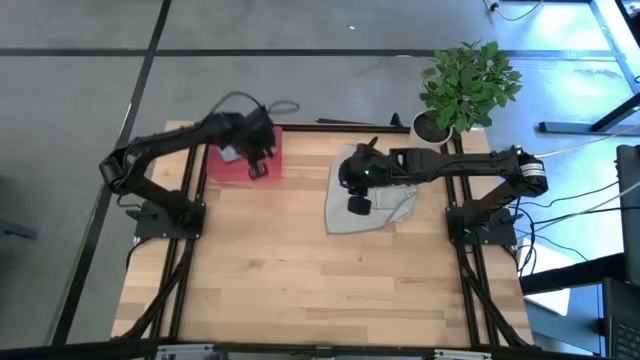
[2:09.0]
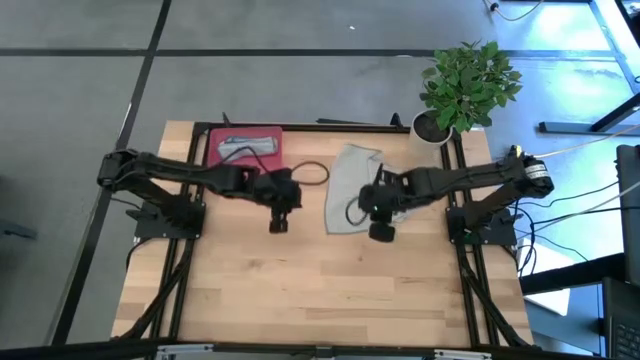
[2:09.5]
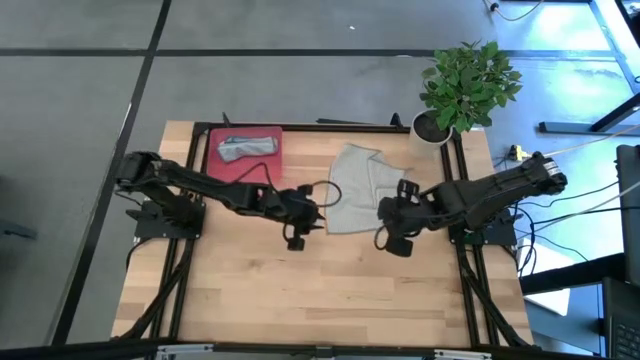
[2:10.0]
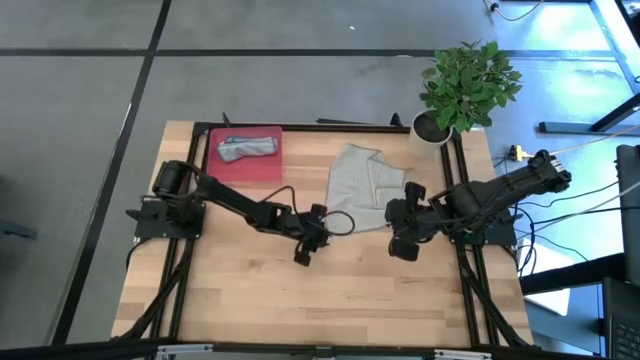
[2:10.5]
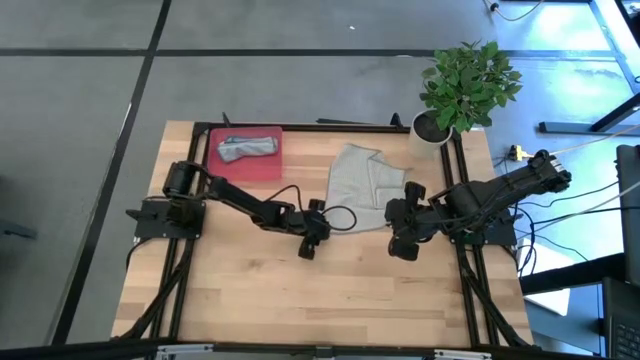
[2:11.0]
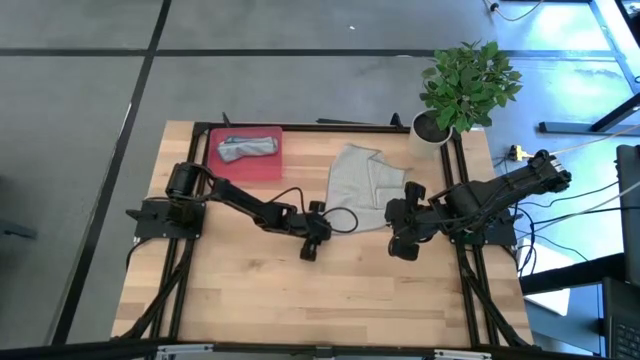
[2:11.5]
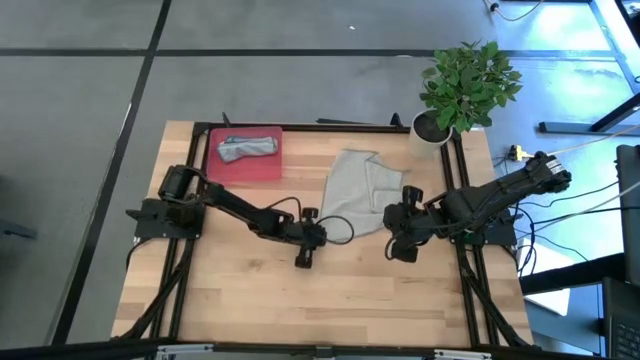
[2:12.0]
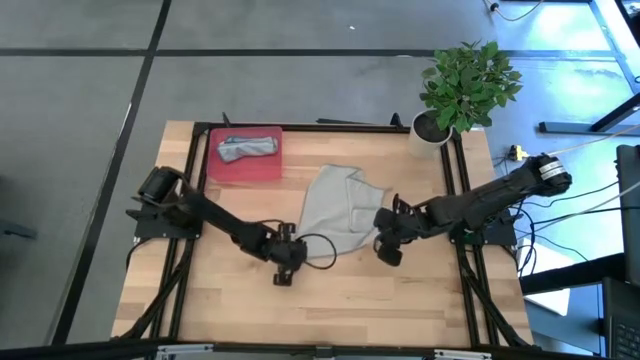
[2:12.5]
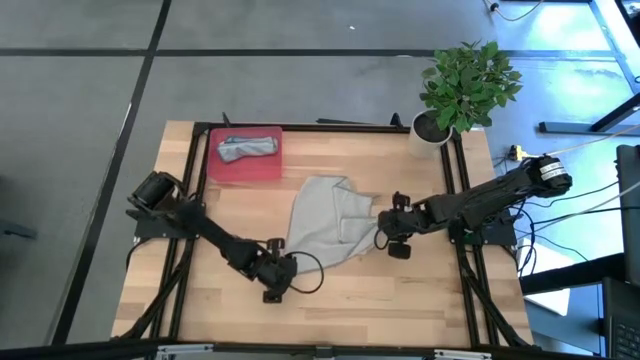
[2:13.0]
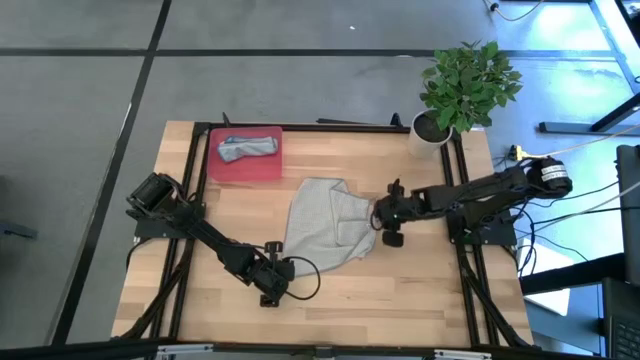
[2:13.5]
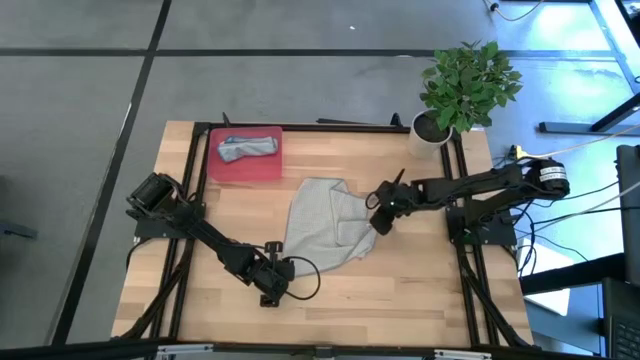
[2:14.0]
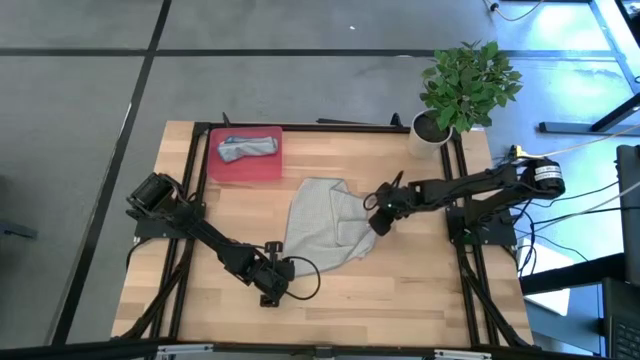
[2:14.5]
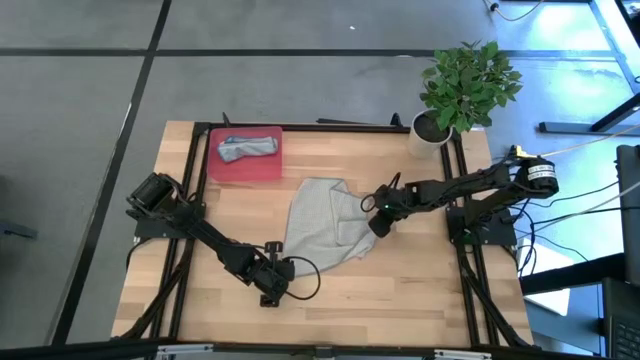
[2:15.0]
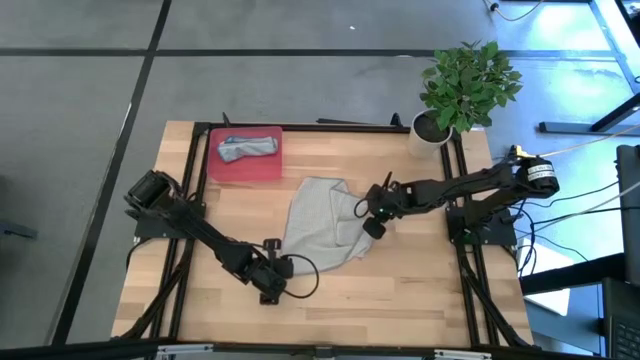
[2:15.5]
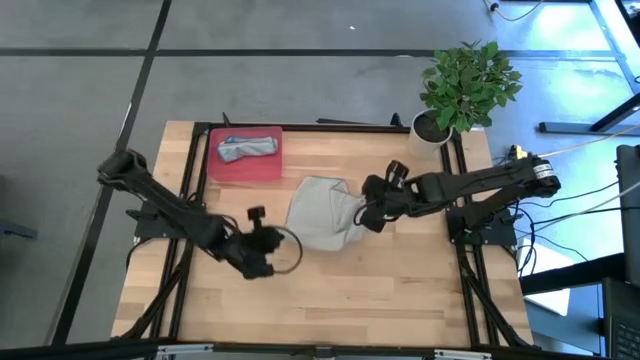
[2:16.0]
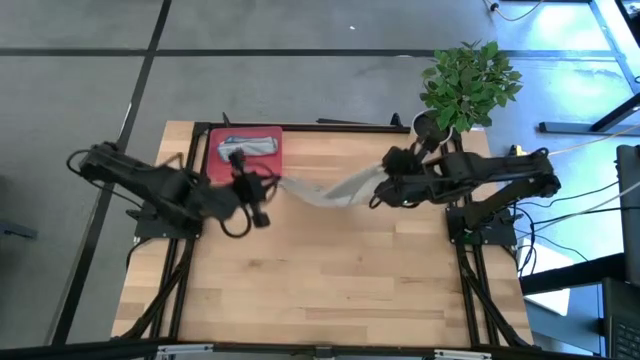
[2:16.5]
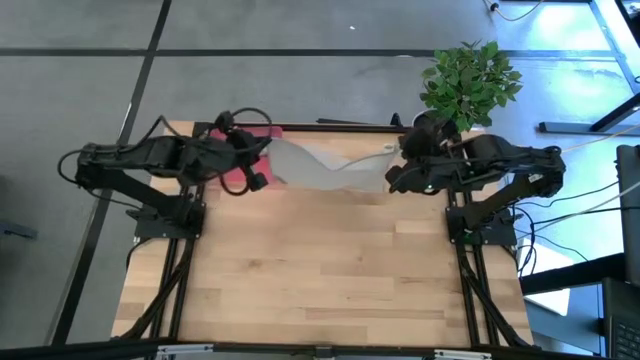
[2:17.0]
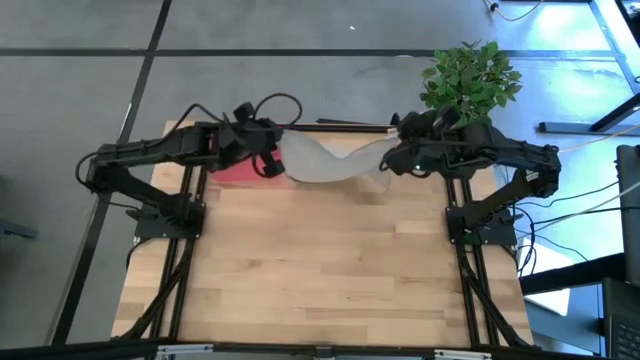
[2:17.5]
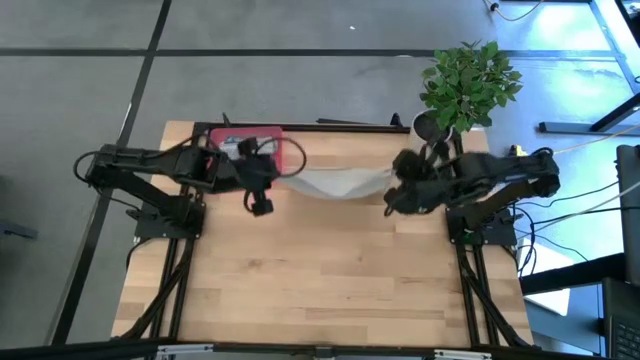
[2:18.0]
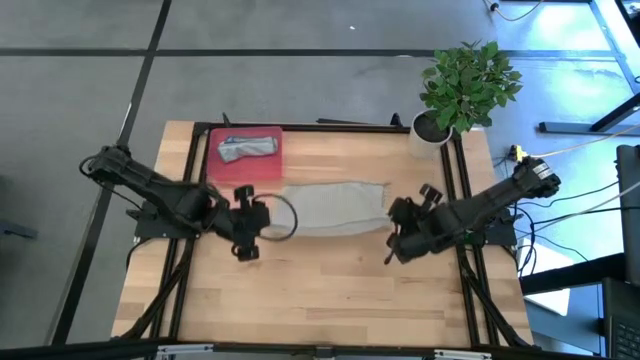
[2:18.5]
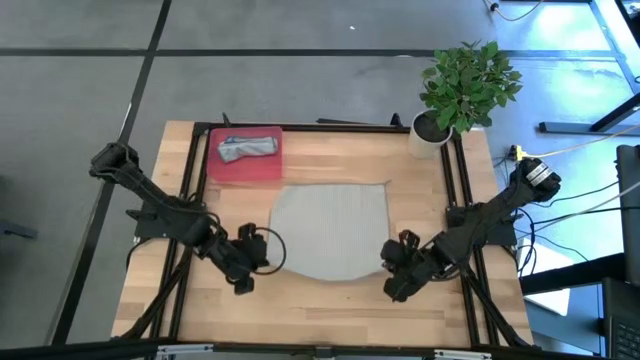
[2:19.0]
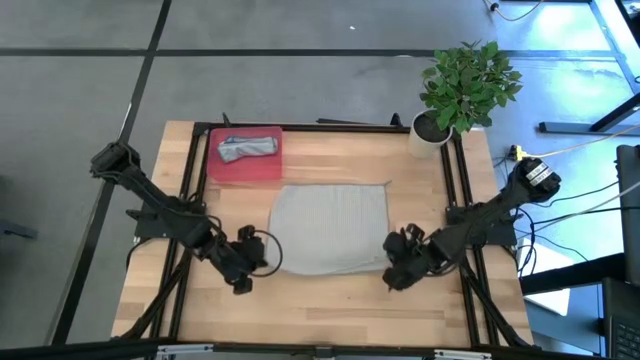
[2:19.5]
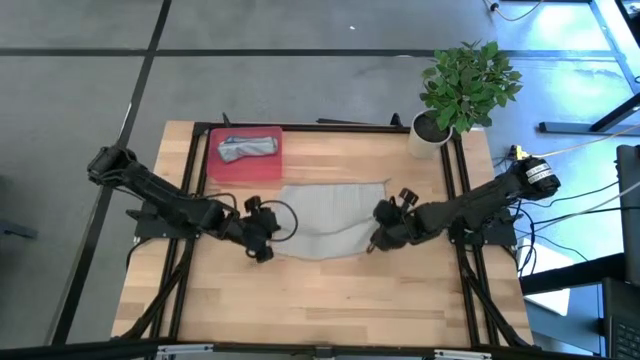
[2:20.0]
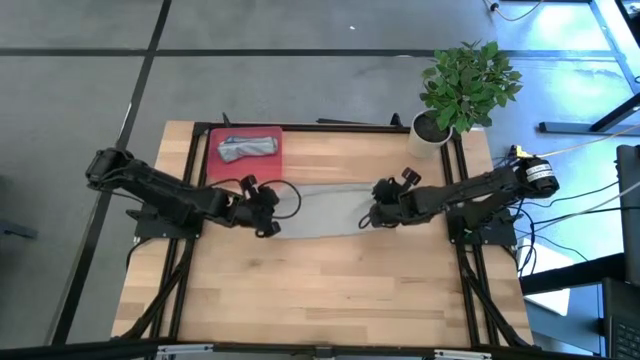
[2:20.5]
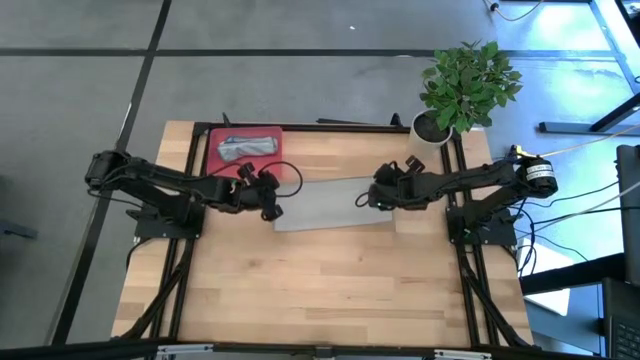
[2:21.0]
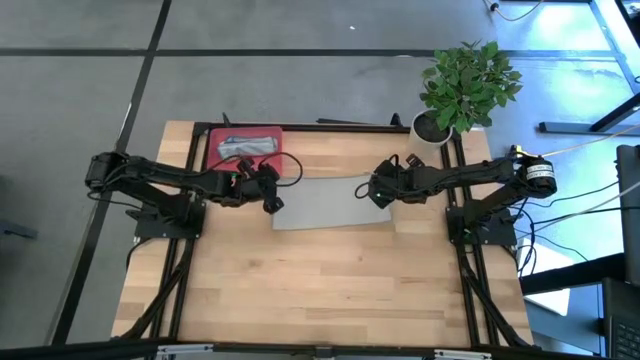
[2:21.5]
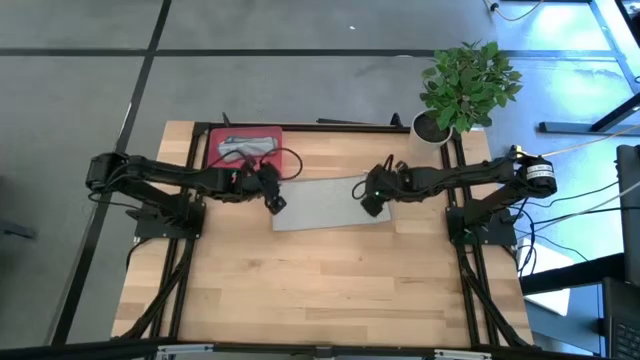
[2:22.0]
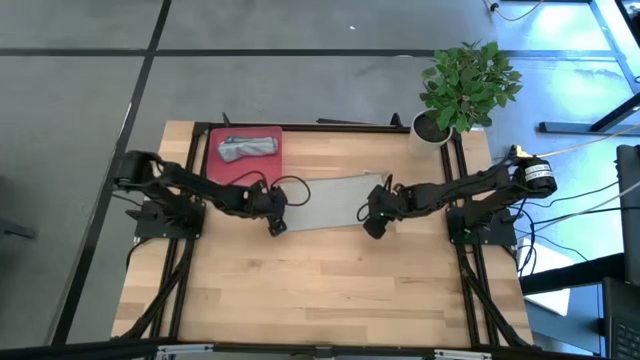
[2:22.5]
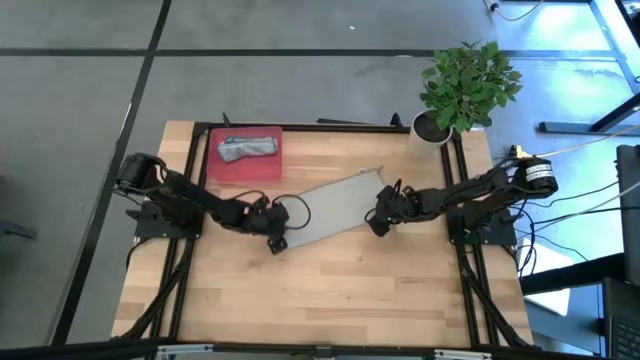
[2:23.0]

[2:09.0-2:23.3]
Task: Roll microfiber towels into tight, uniform cylinder then place into a basket
Fold the gray towel

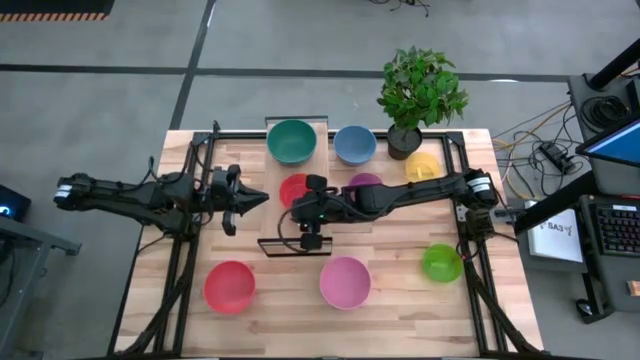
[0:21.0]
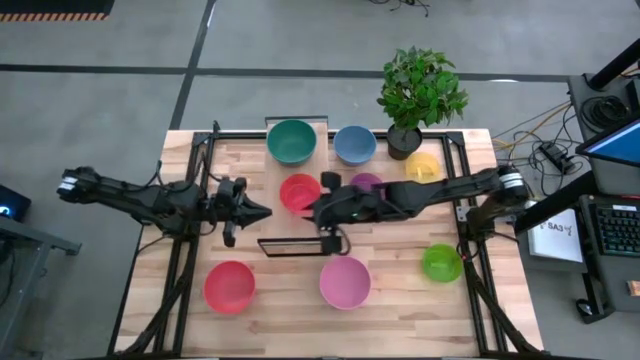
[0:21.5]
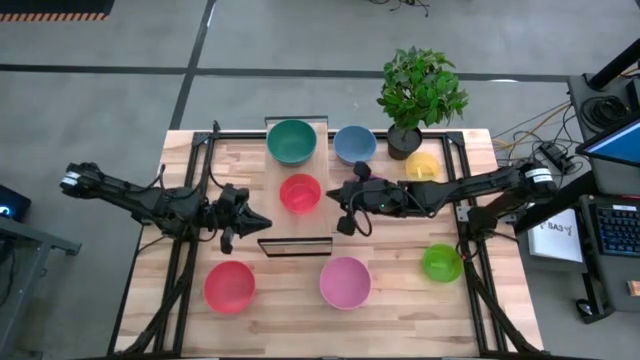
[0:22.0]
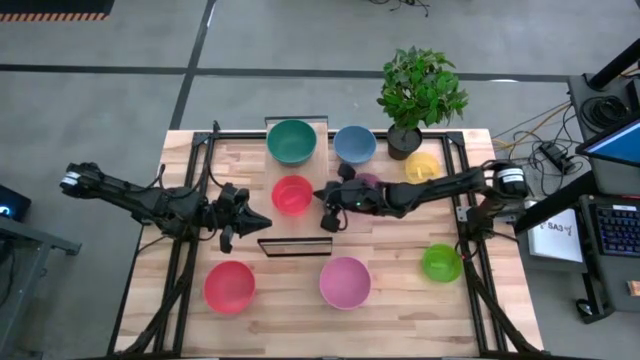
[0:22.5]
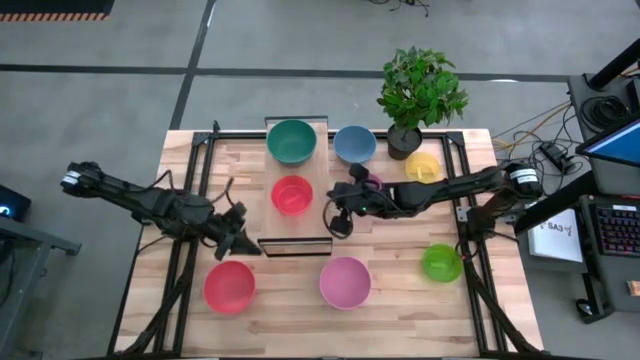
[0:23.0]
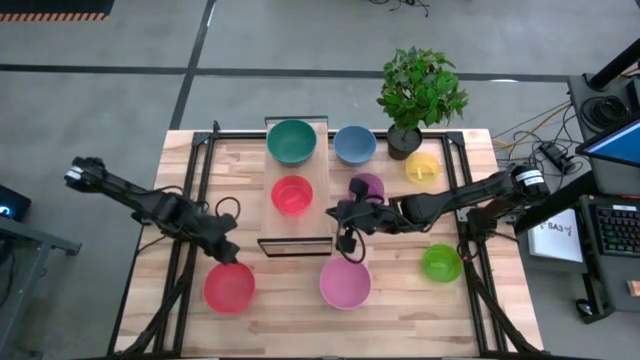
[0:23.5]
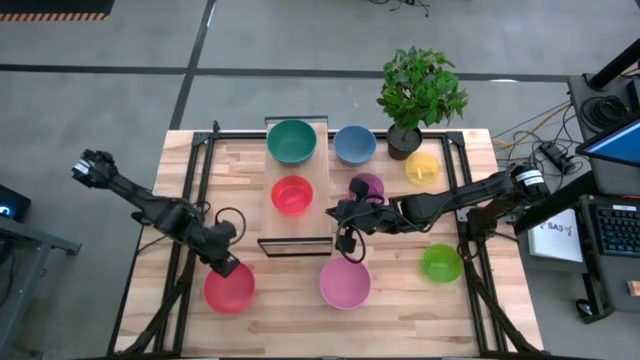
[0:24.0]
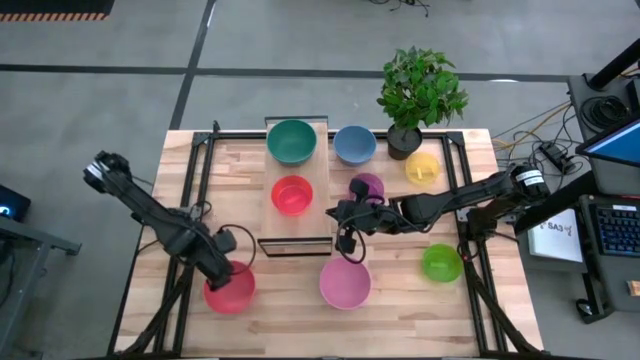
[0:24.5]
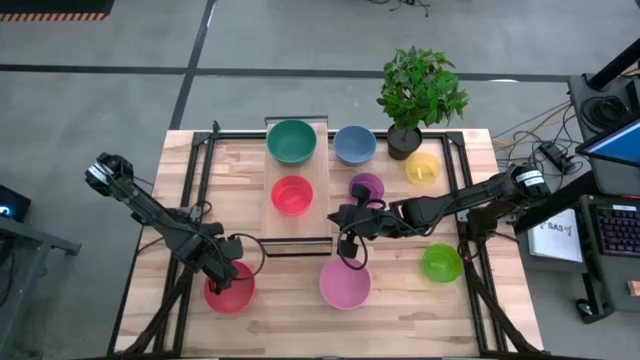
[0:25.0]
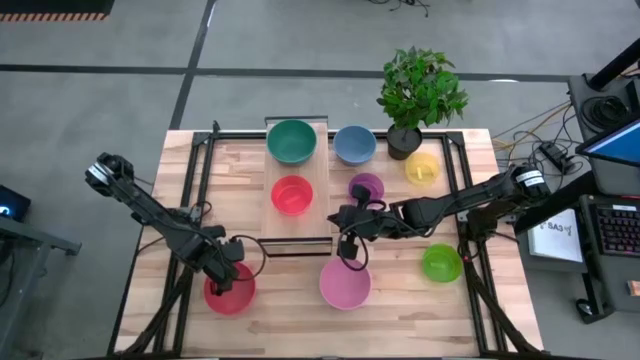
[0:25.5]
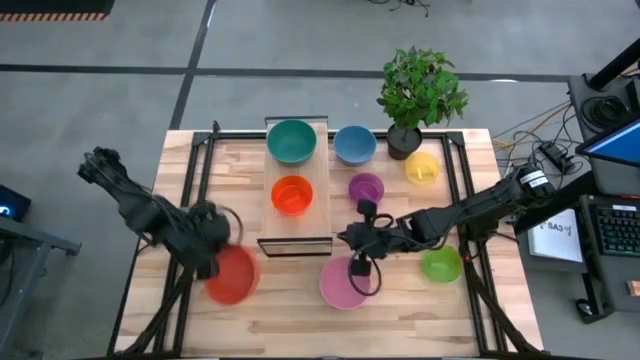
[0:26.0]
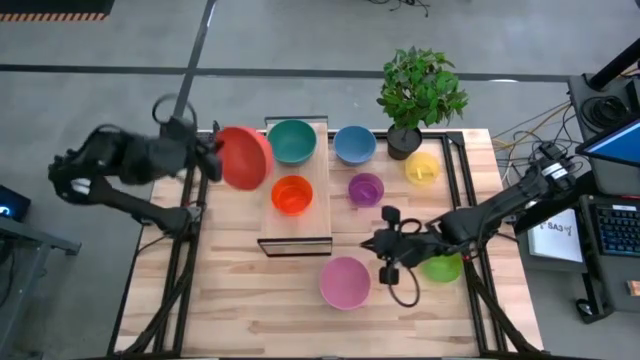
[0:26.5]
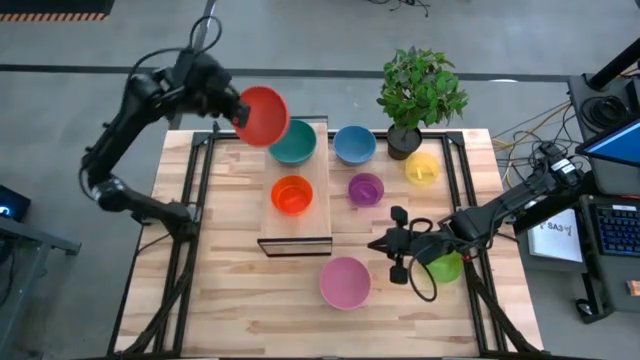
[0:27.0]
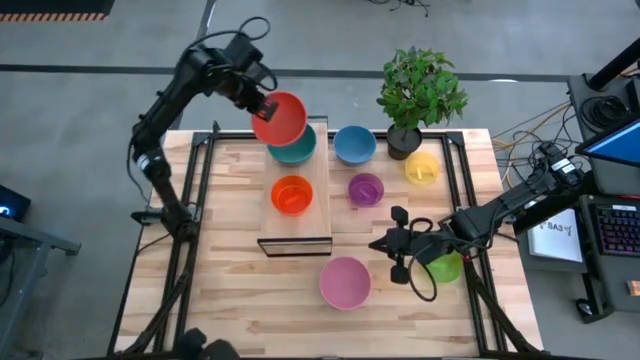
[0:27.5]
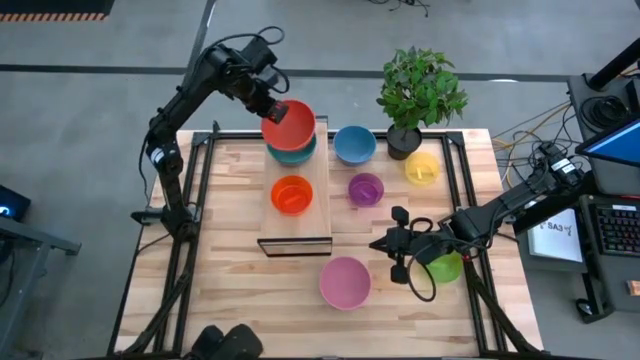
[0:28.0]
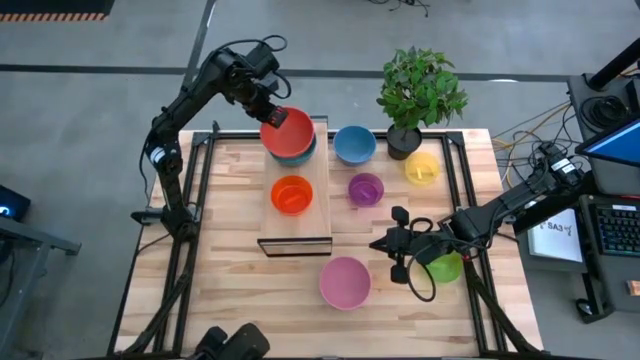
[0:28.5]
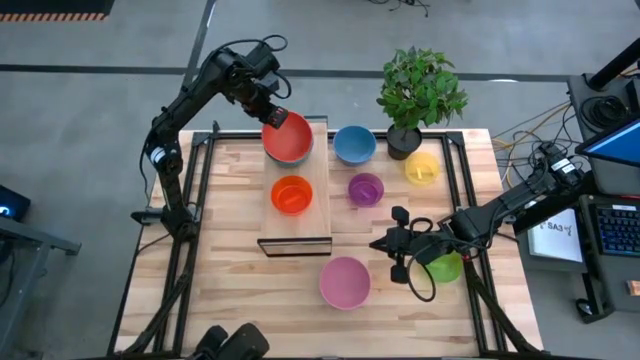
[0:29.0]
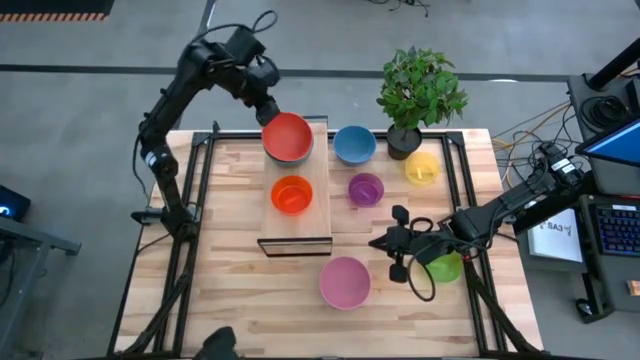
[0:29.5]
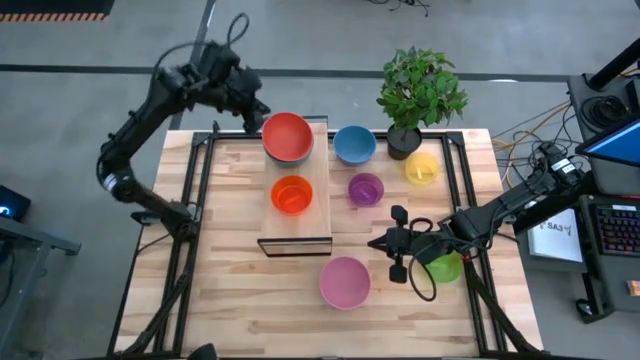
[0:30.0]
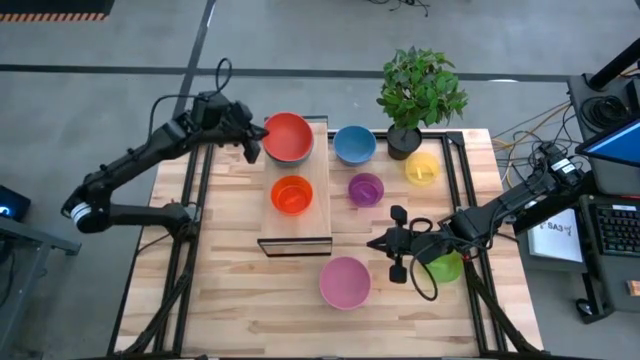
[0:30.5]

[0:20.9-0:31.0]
Task: Place and stack bowls onto a shelf
Stack the orange bowl on top of the dark green bowl on the shelf
